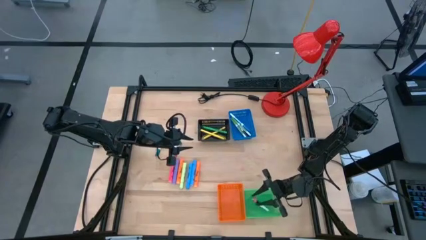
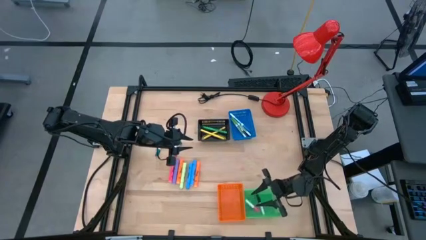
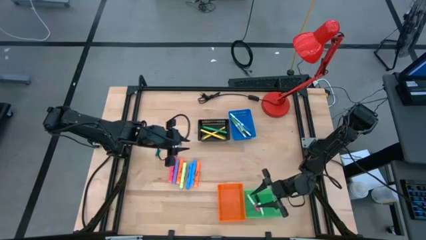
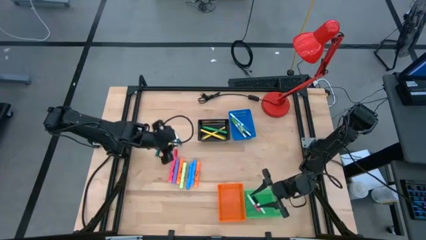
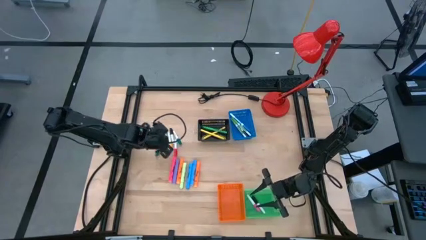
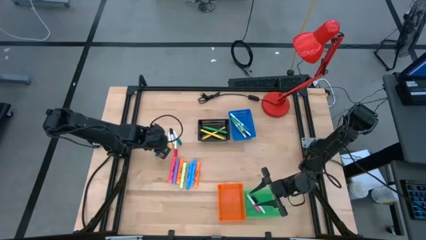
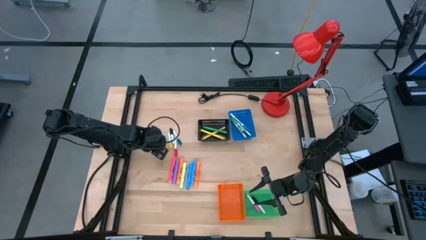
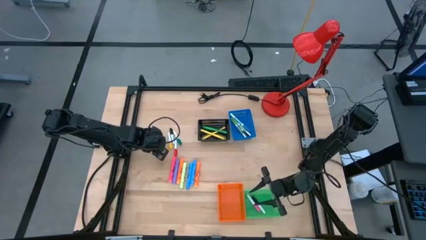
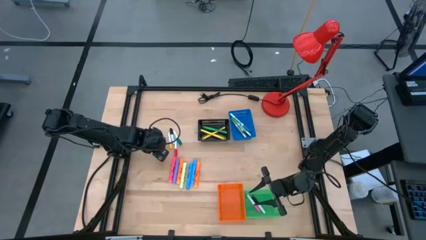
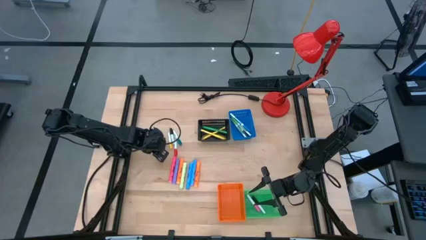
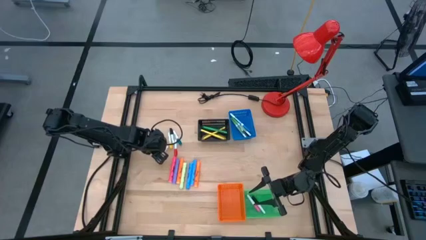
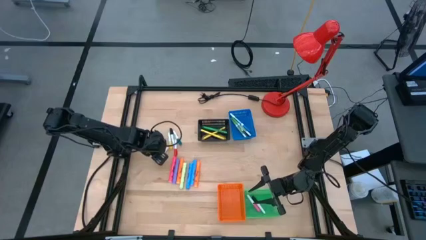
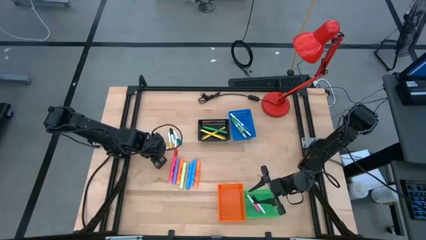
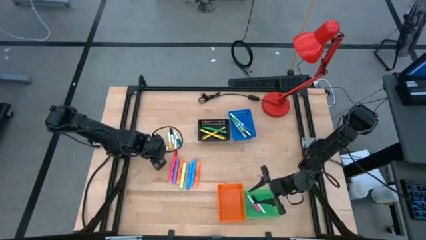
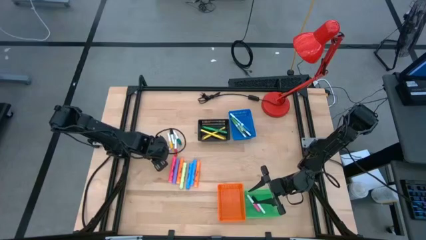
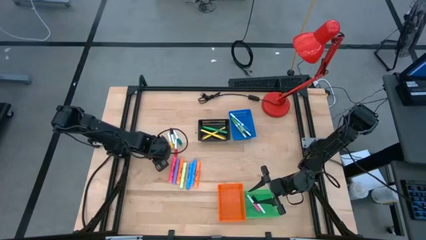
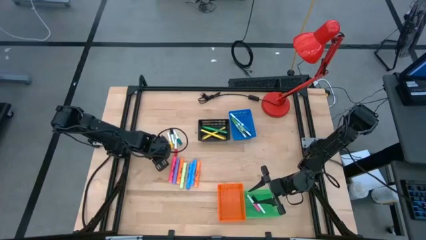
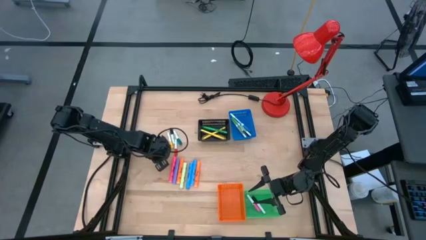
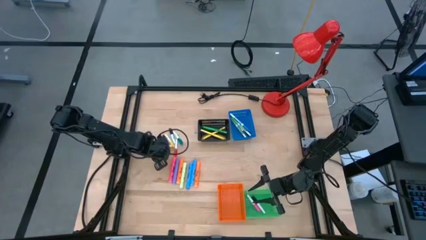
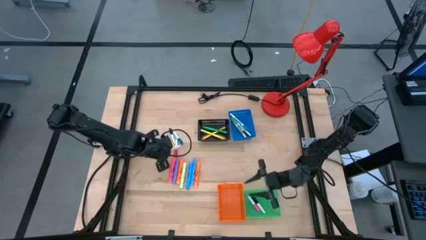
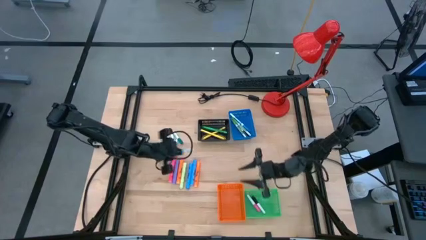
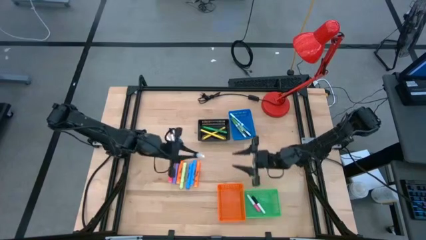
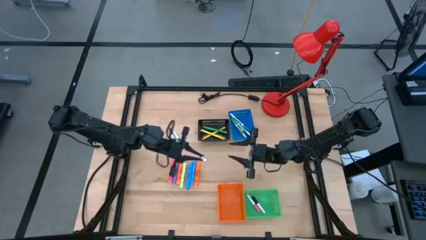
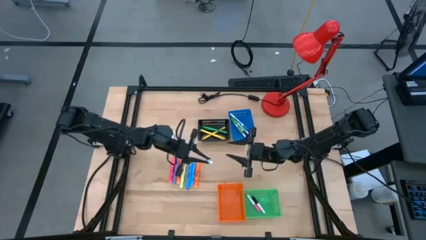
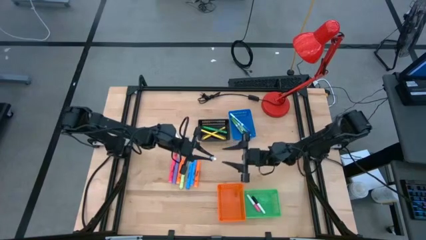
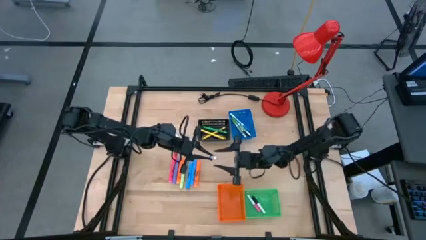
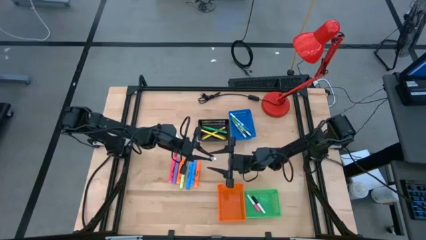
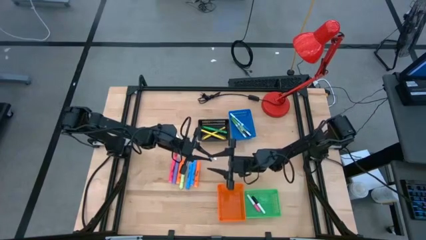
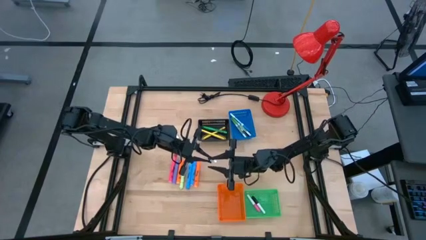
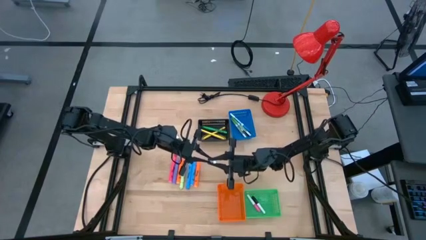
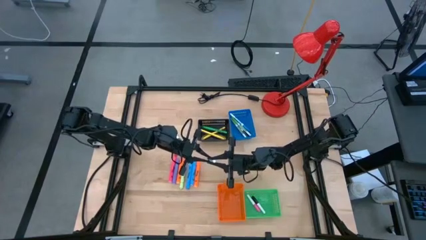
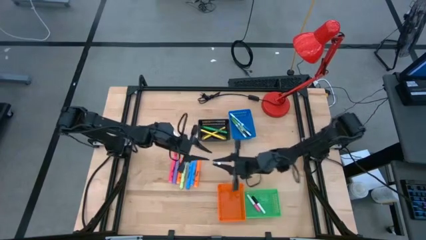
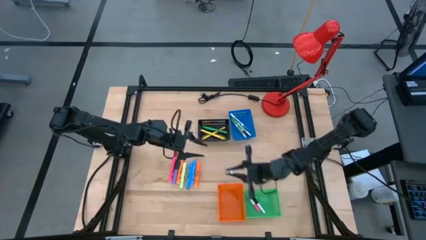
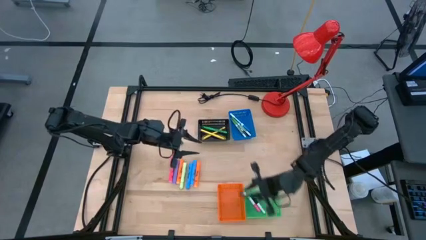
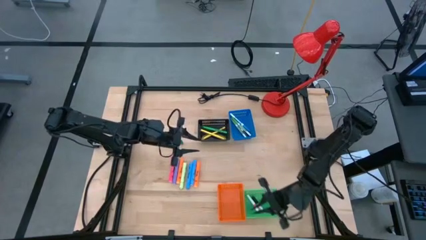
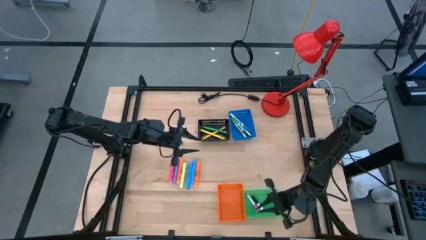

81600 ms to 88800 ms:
Task: Pick & Place Markers
Put the green highlighter pen into the green bin

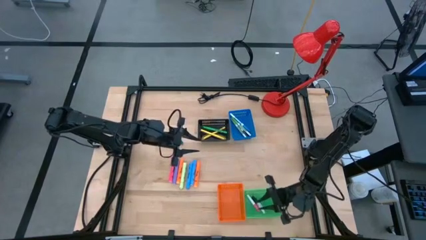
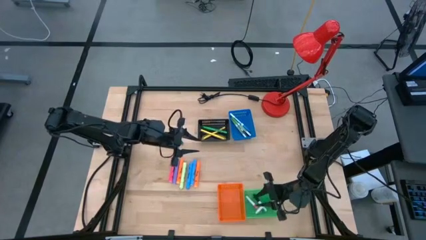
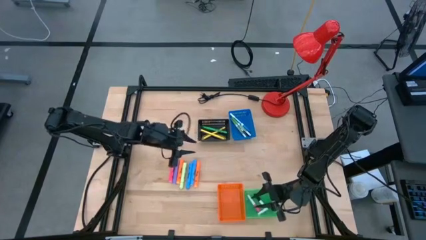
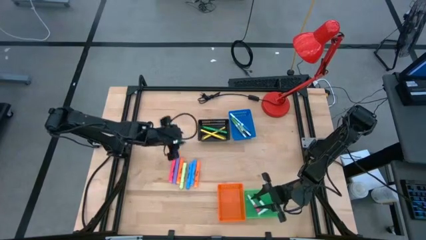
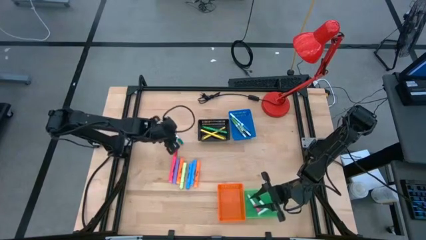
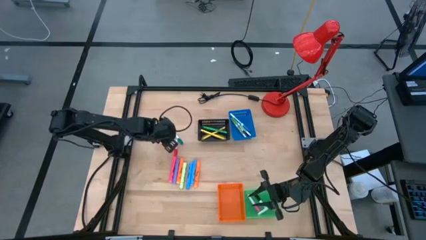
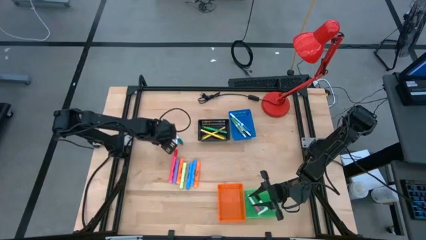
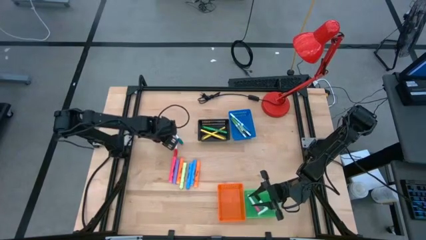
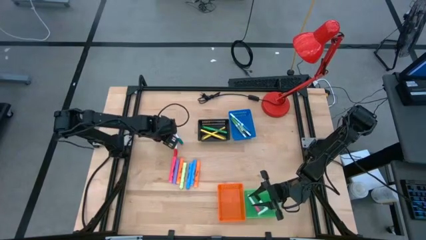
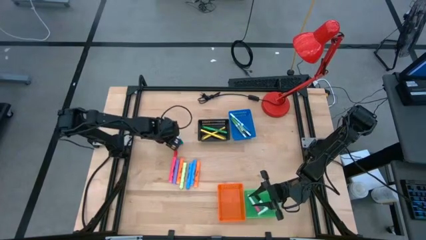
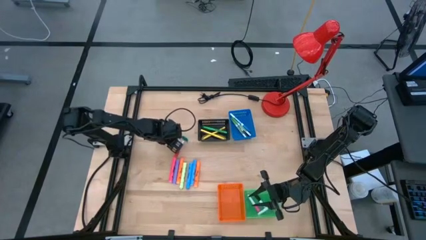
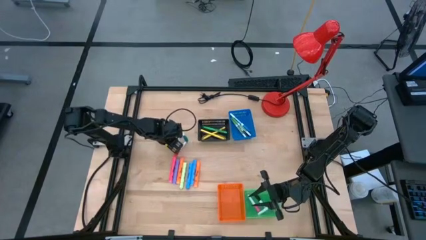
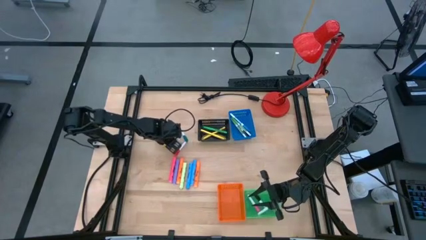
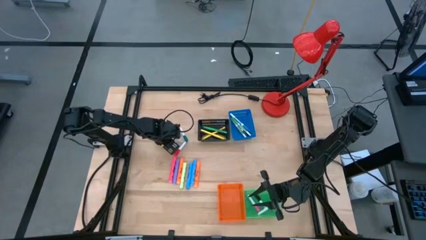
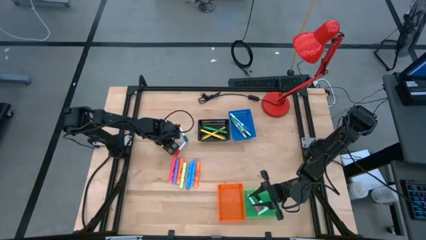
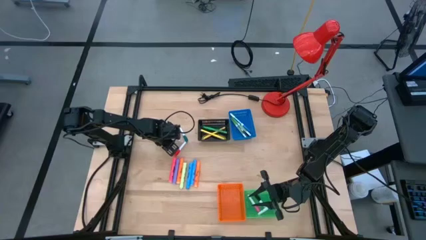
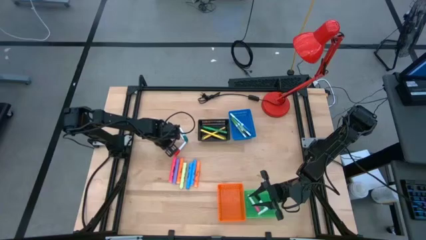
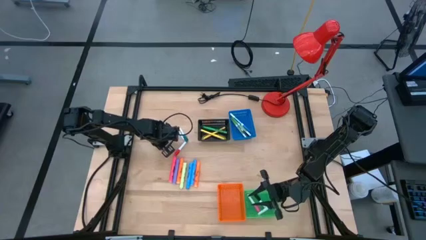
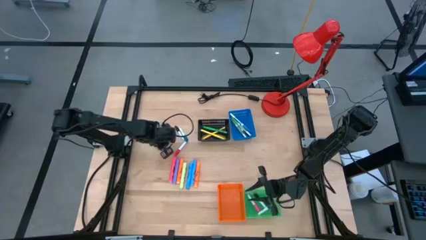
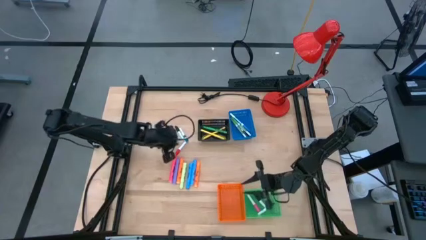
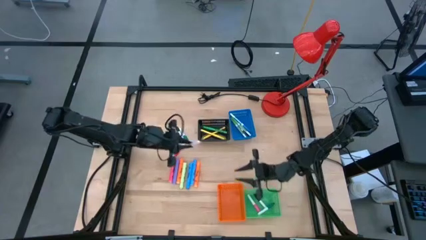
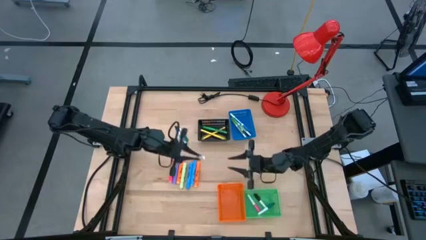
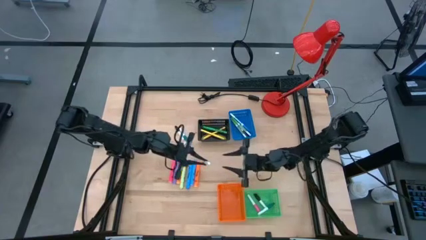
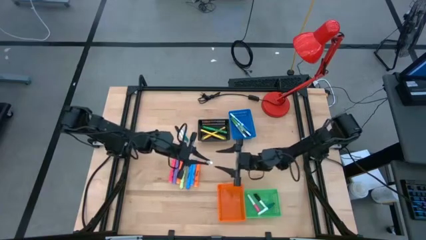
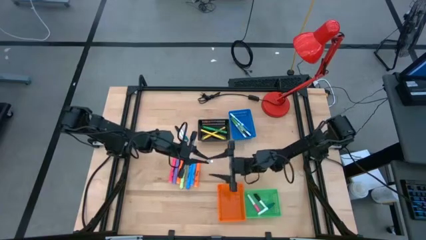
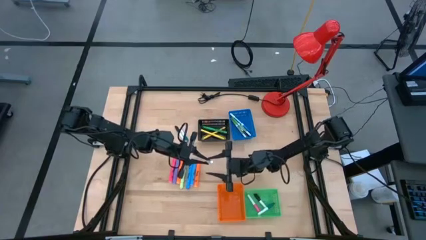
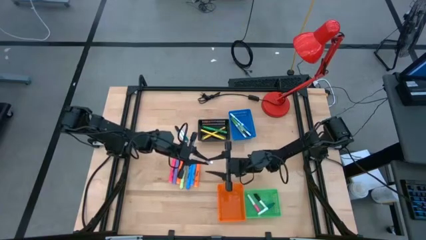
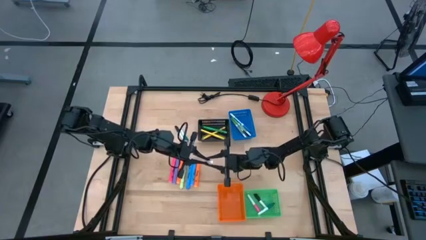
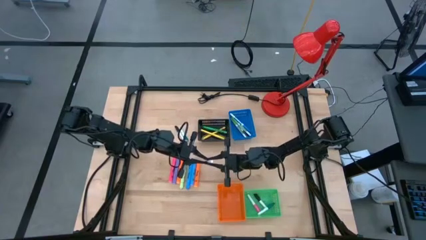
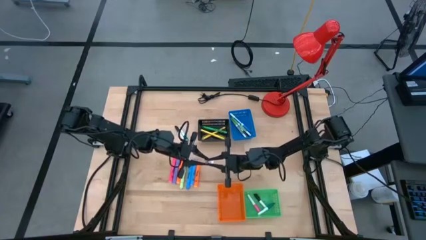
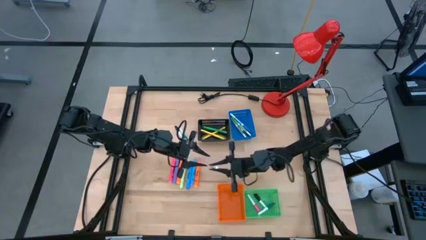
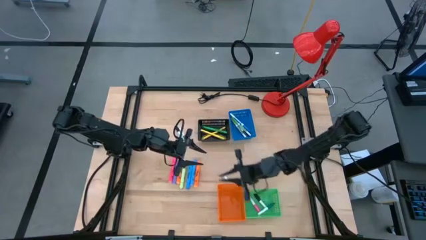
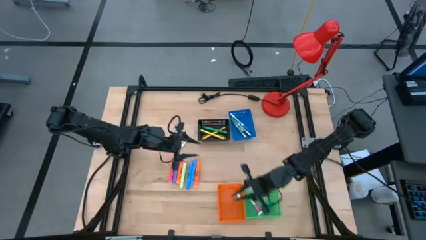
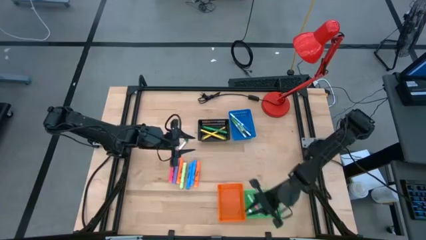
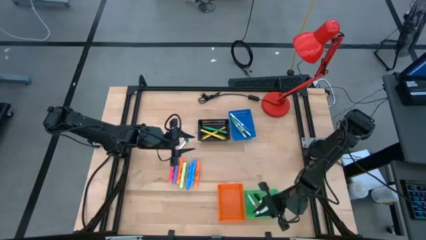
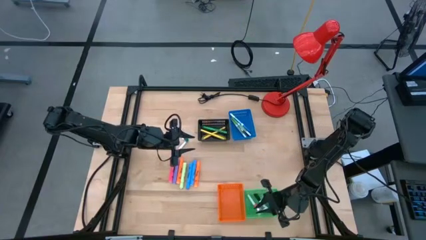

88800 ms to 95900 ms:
Put the yellow highlighter pen into the green bin

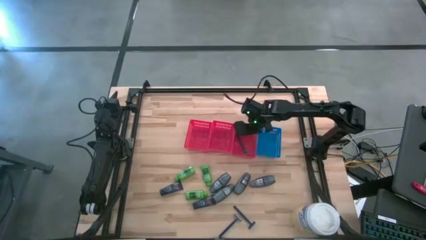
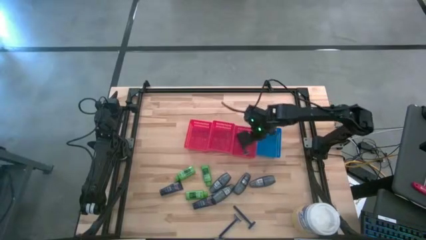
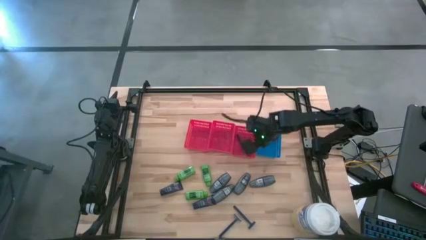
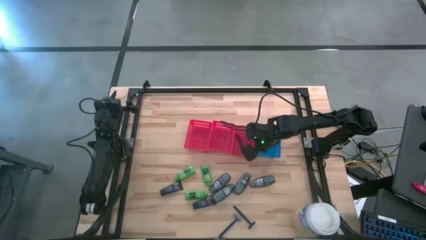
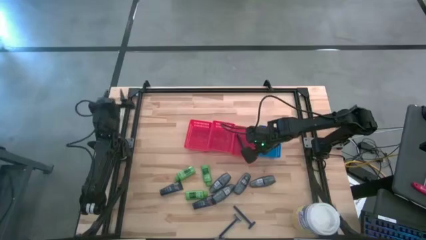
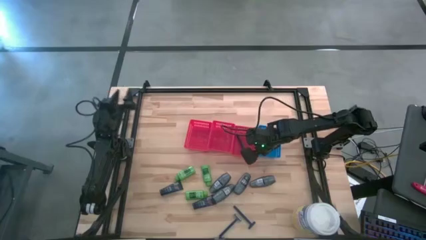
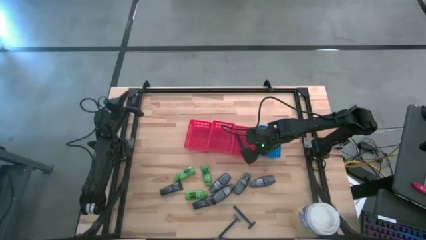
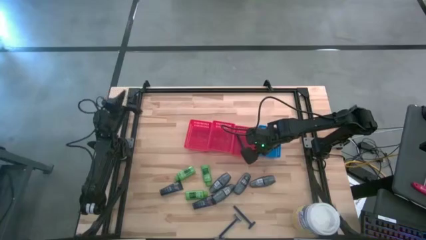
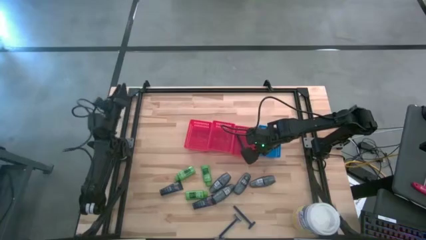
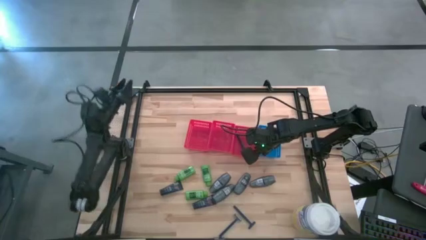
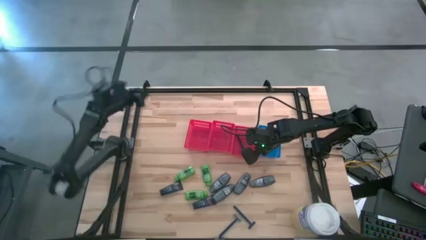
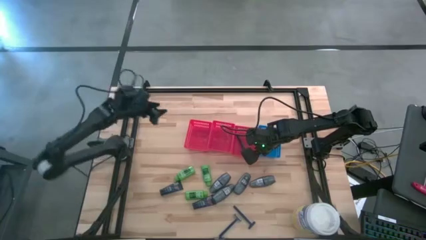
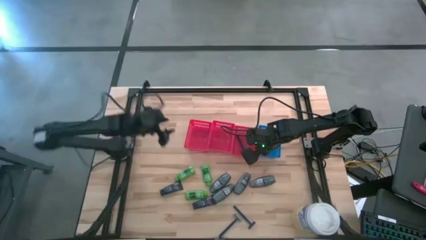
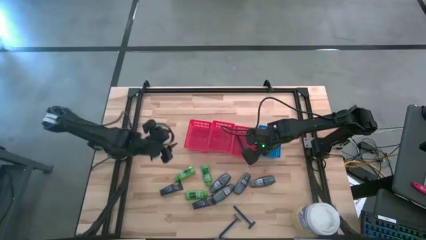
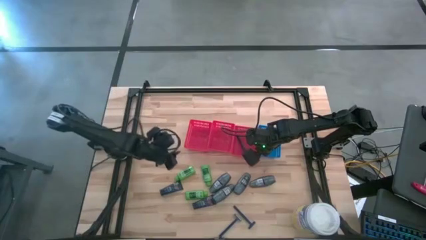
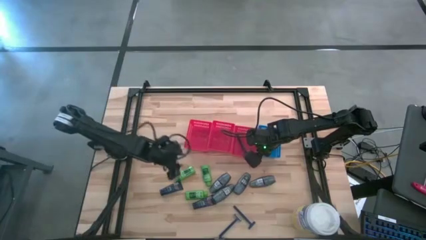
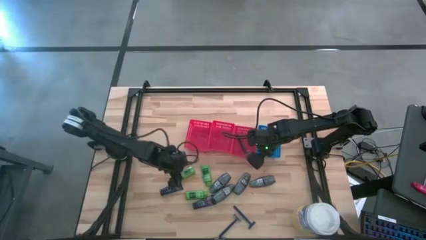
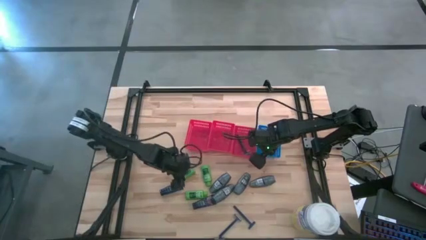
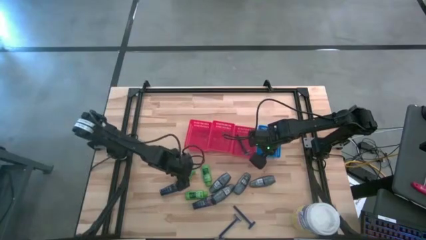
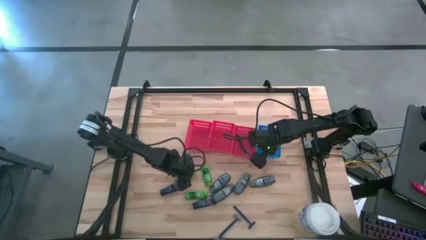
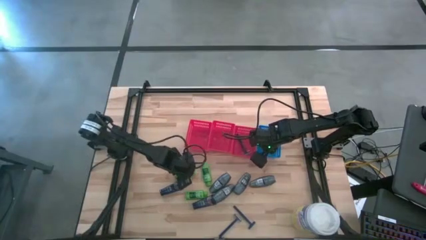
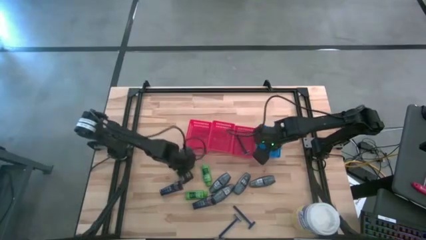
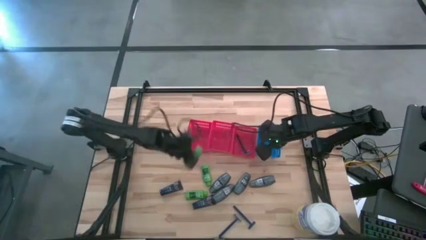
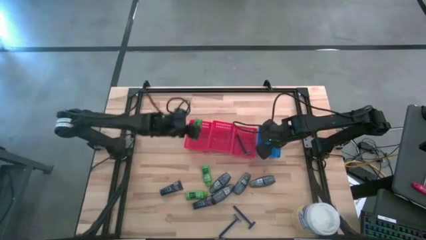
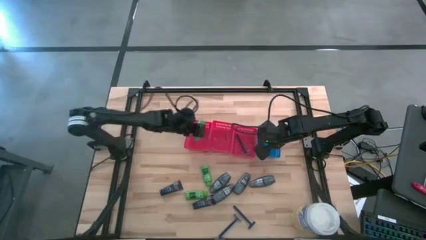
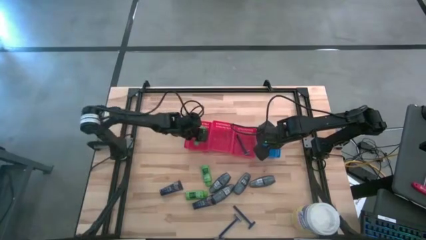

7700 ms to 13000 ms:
Task: Pick & Place Travel size toiletries
Put the green shampoo in the left red bin
